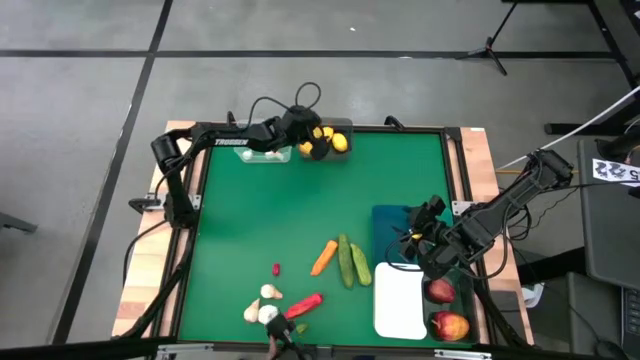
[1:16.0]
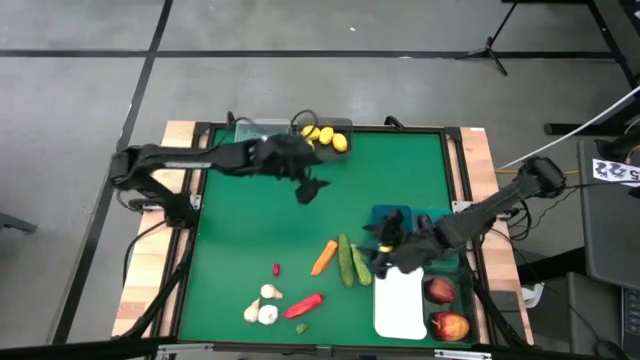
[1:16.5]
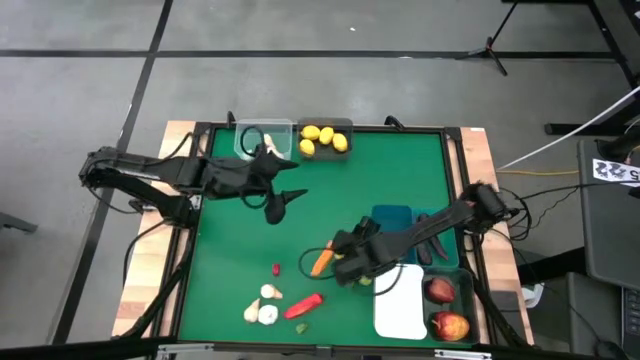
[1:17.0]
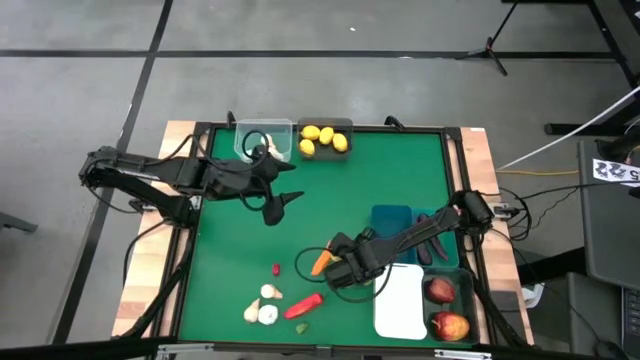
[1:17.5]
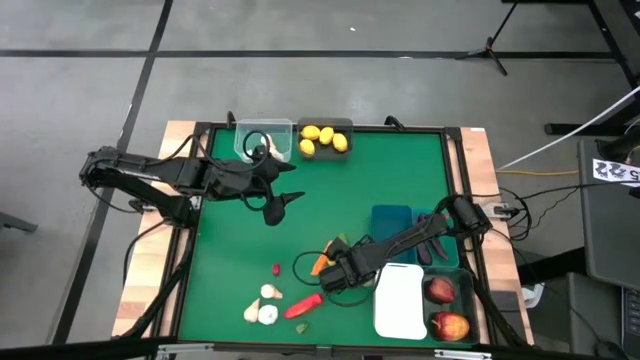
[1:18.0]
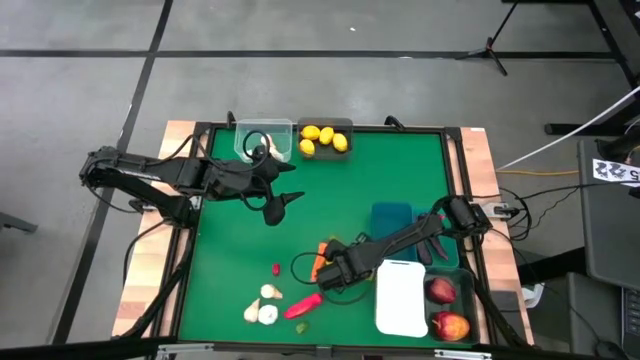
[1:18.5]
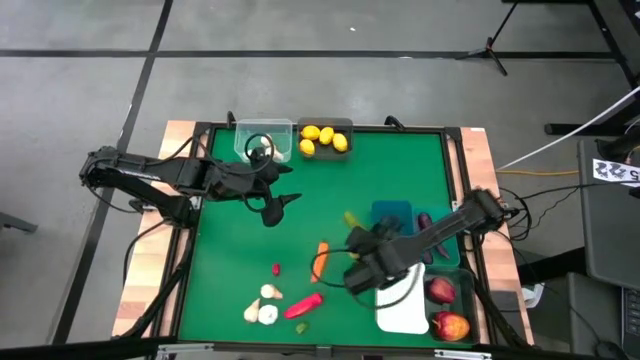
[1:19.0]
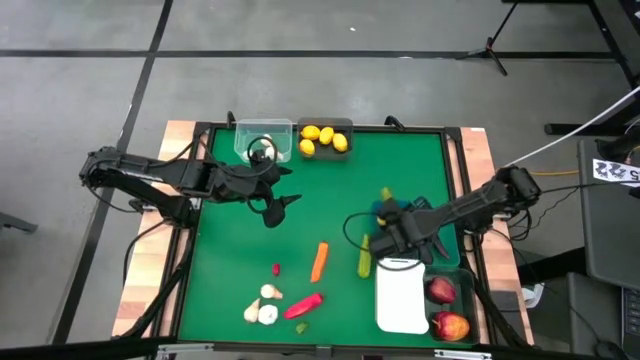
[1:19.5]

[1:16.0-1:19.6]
Task: Sort produce into baskets
Put the green cucumber into the blue bin

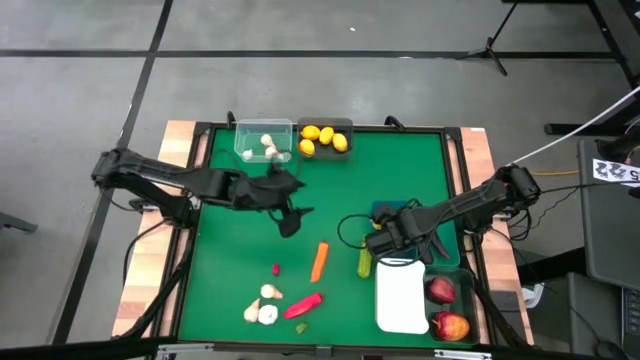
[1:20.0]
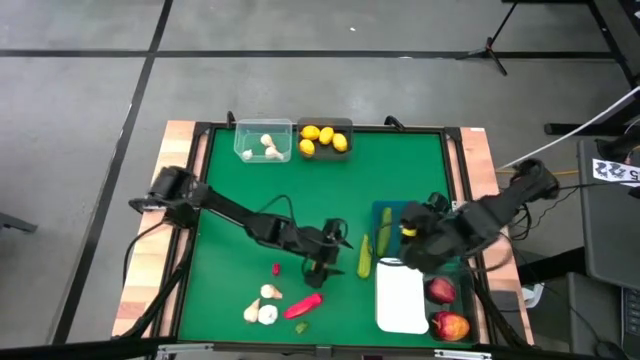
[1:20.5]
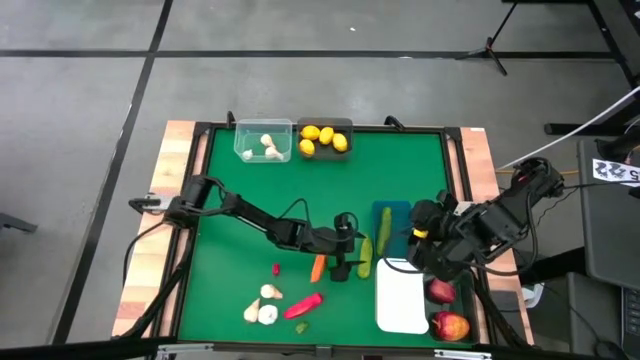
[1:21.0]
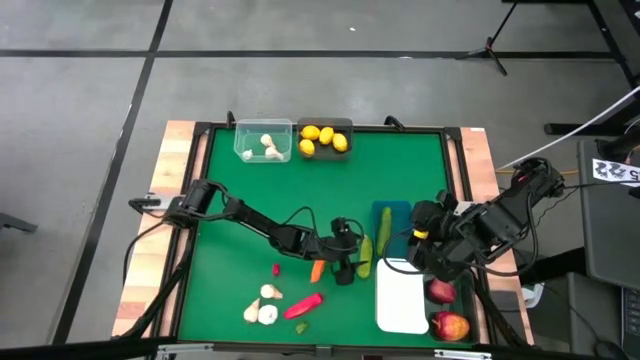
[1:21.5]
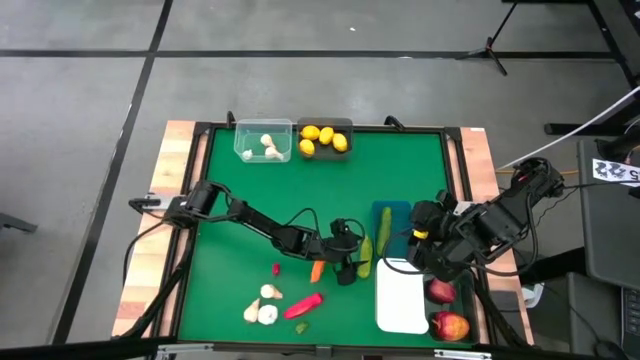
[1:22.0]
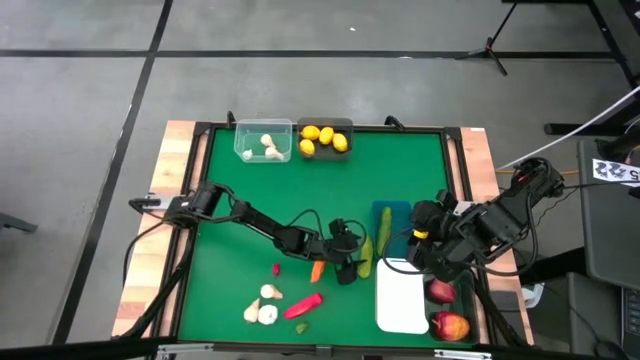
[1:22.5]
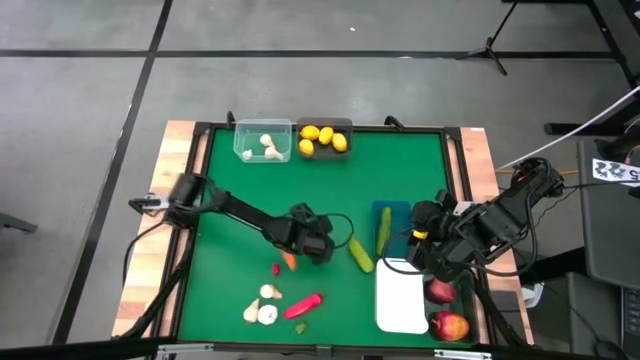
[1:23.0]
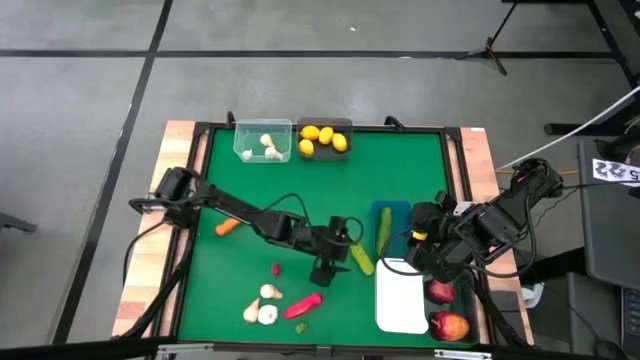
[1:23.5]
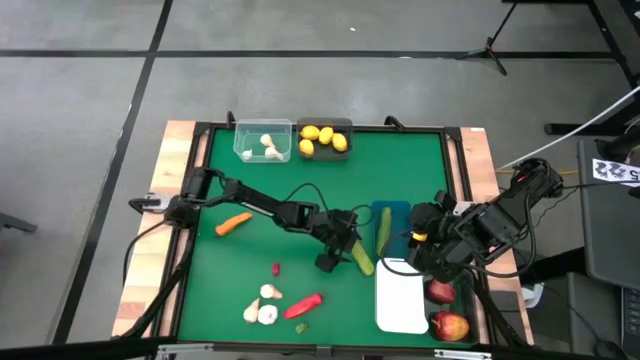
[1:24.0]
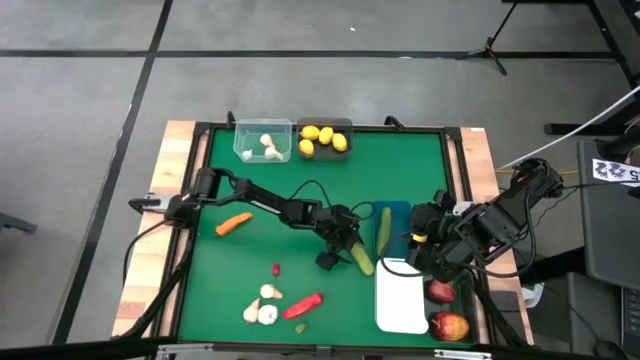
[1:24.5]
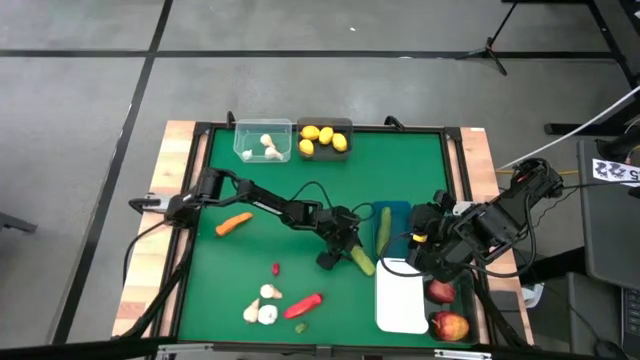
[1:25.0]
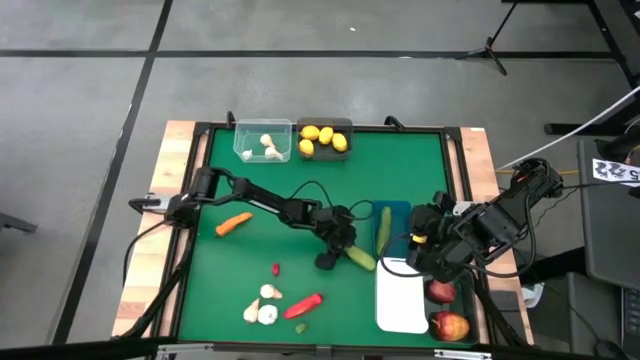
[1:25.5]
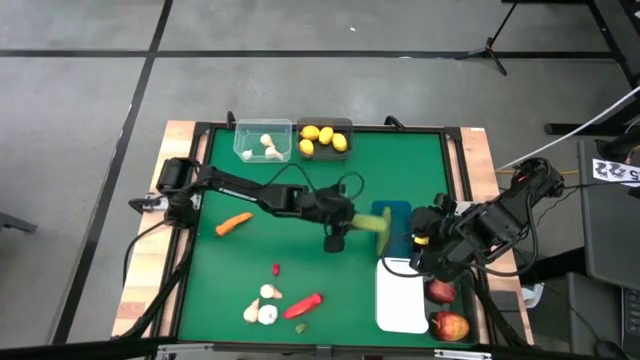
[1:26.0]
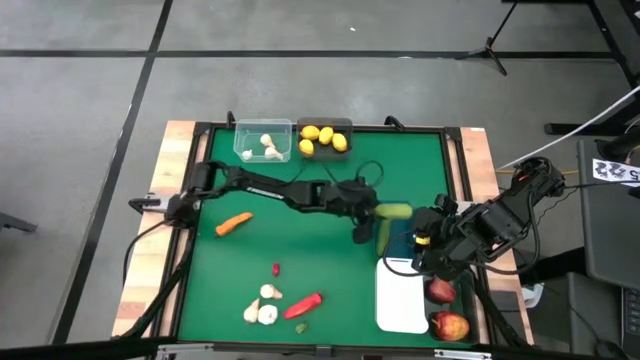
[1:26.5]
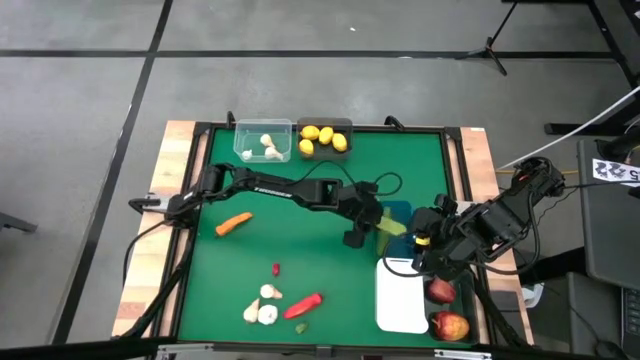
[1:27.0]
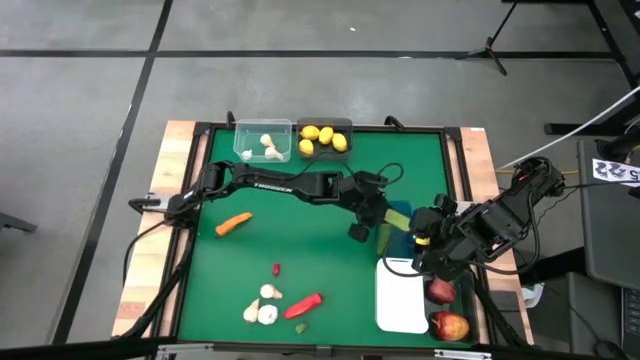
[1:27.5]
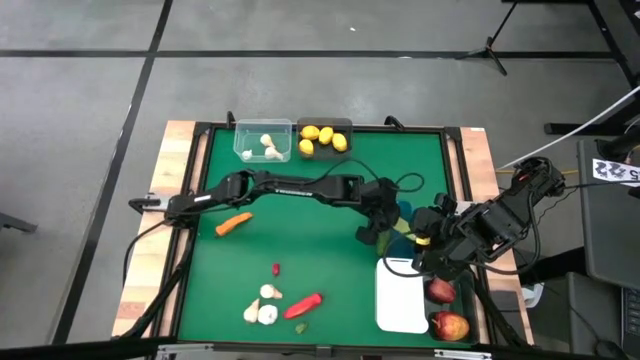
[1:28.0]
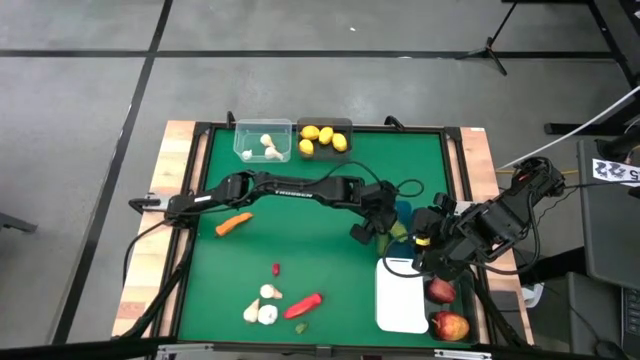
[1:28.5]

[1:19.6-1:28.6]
Put the green cucumber into the blue bin

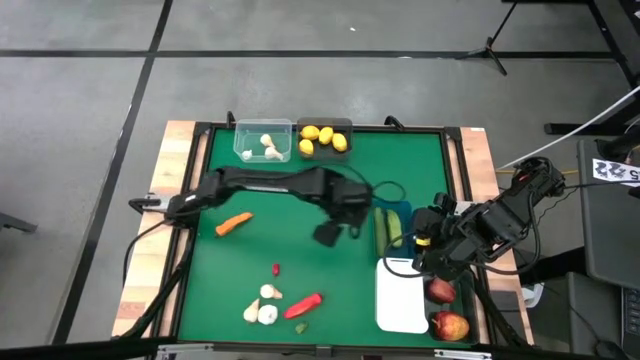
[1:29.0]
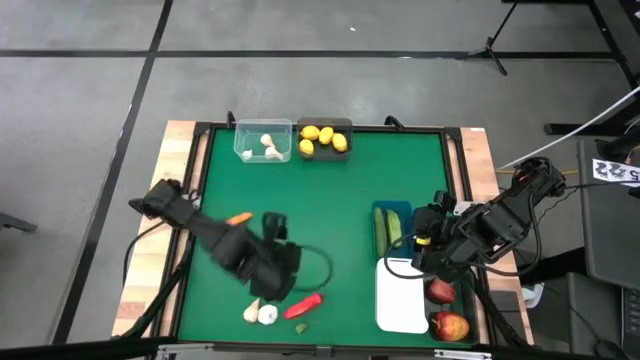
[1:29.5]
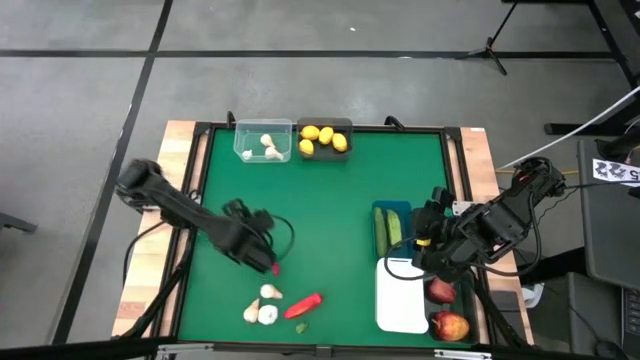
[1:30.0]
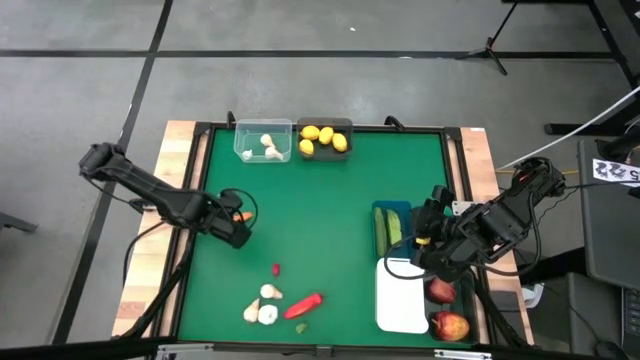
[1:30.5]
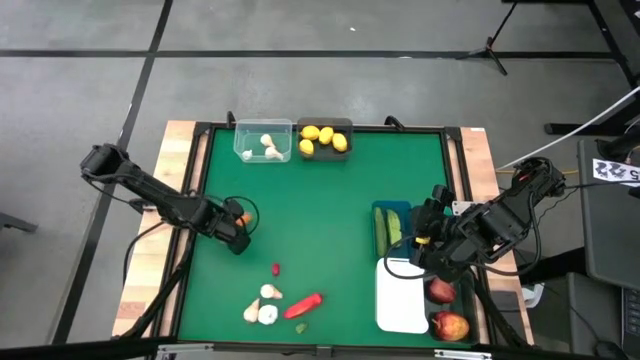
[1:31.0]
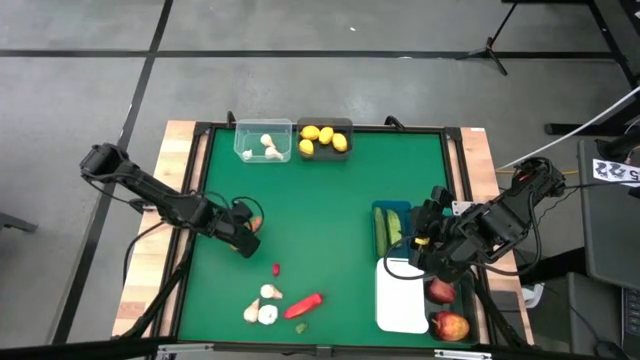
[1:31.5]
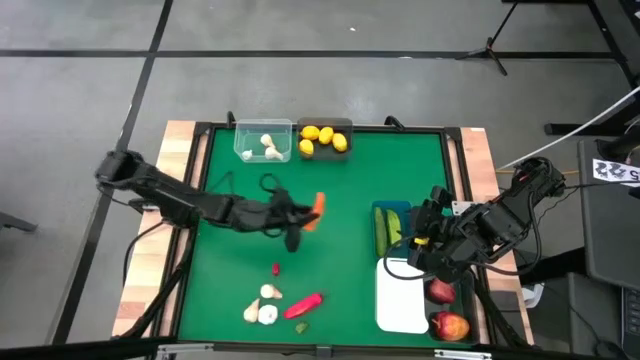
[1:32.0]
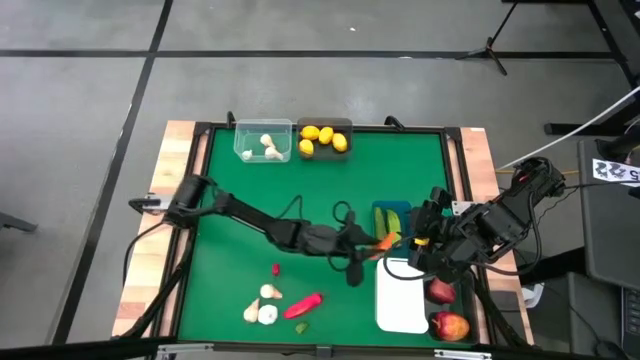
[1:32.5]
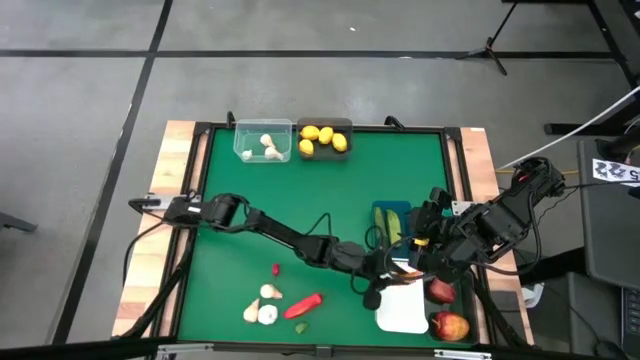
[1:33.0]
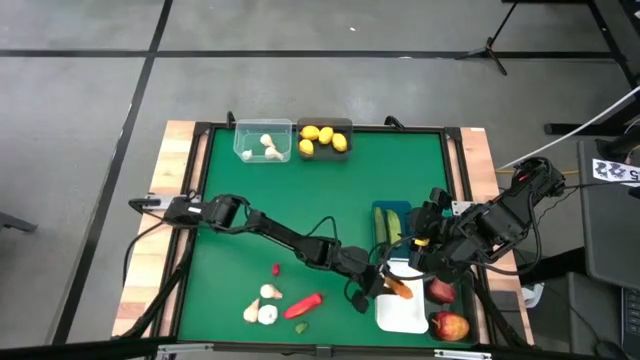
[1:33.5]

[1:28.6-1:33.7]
Put the orange chili pepper into the white bin

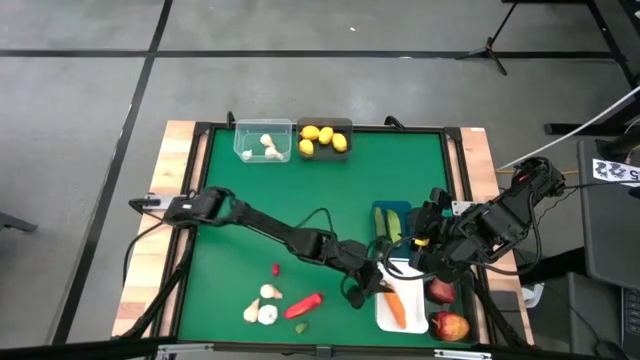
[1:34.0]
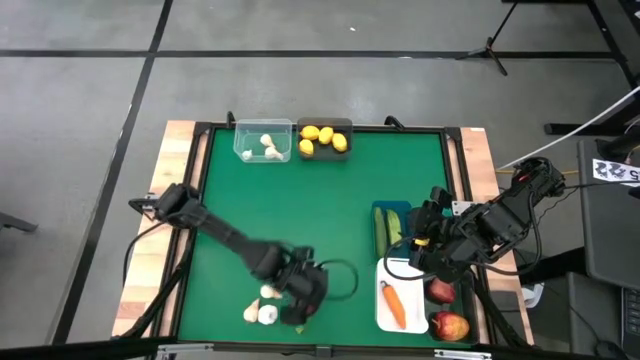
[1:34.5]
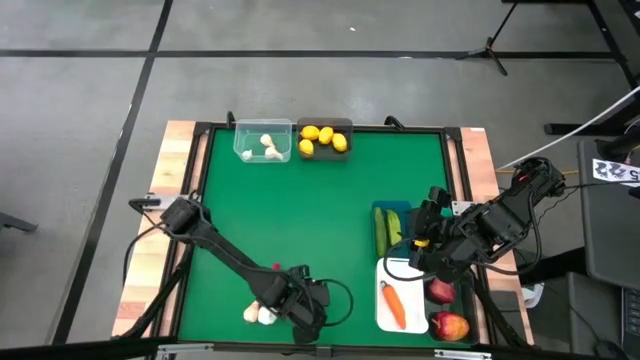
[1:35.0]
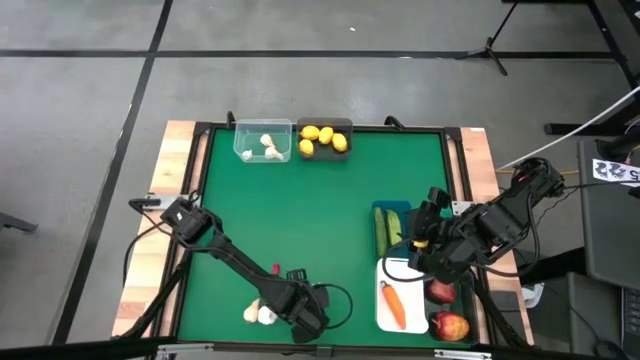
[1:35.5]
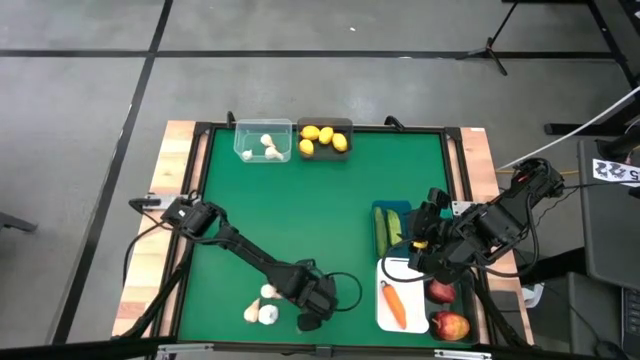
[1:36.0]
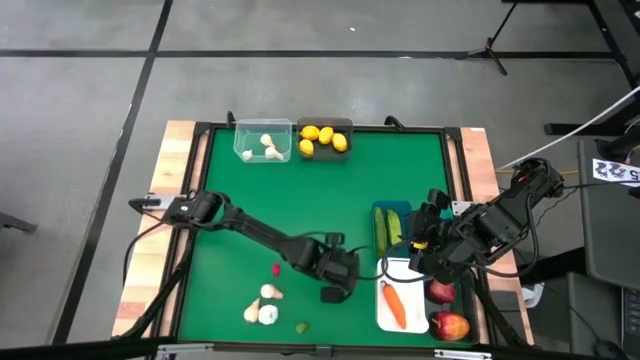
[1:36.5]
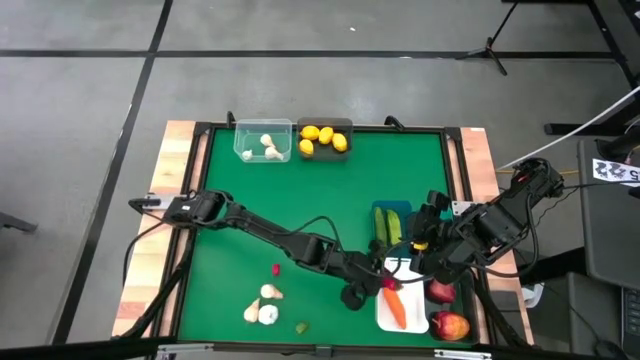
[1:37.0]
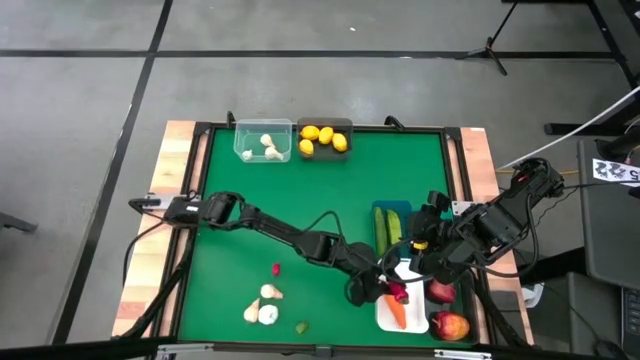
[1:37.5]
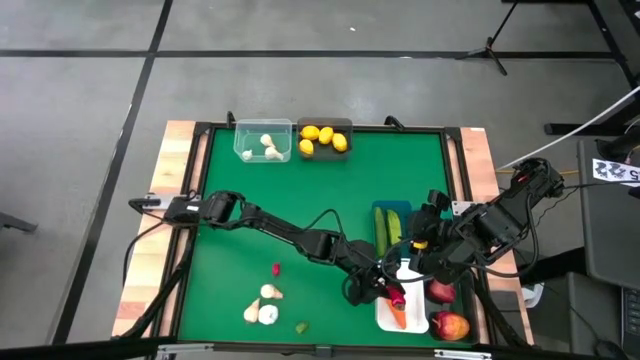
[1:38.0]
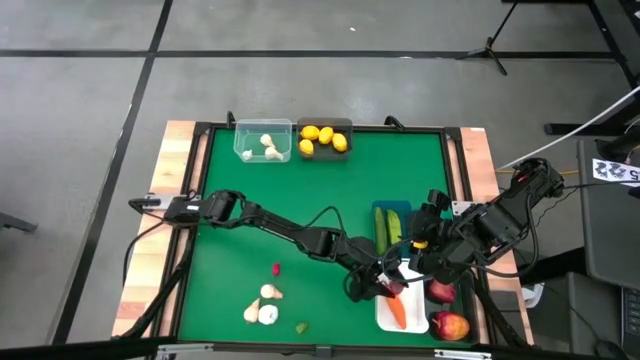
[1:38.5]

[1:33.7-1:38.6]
Put the red chili pepper into the white bin
